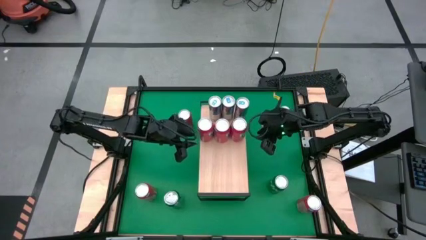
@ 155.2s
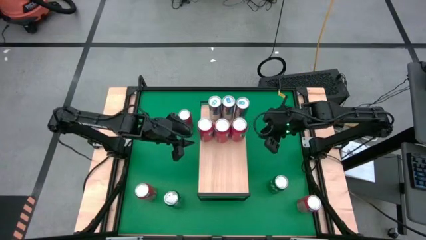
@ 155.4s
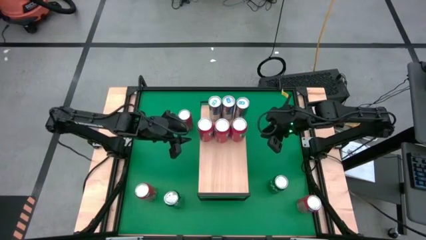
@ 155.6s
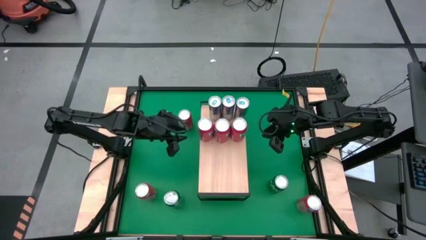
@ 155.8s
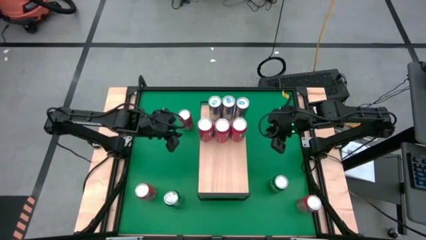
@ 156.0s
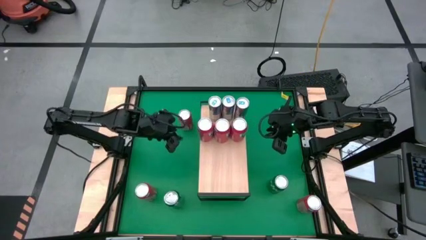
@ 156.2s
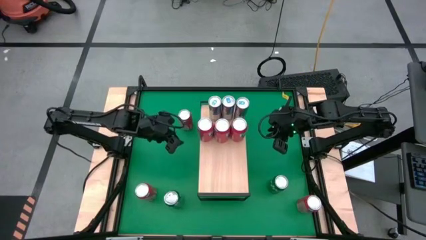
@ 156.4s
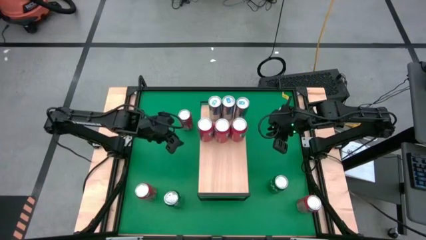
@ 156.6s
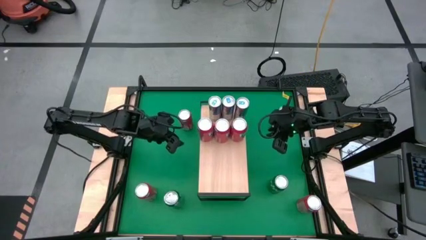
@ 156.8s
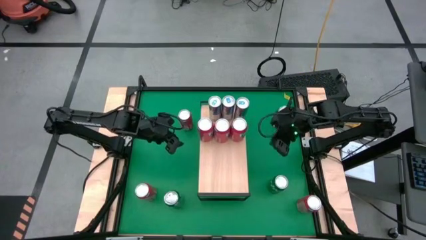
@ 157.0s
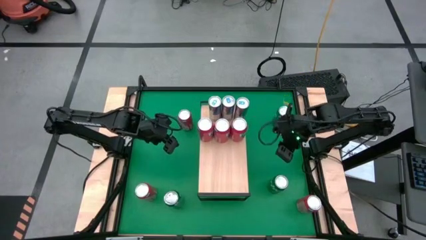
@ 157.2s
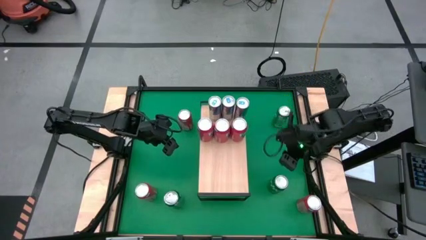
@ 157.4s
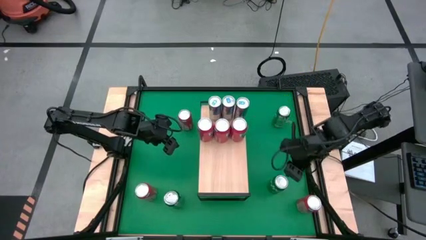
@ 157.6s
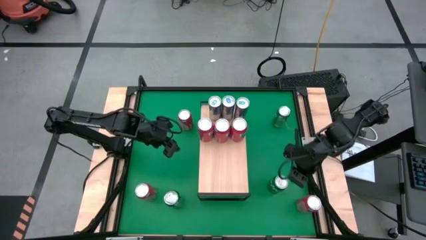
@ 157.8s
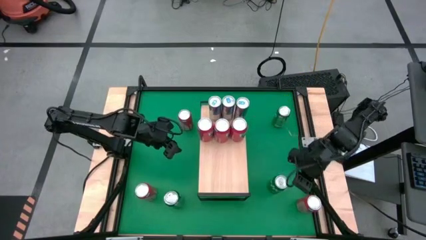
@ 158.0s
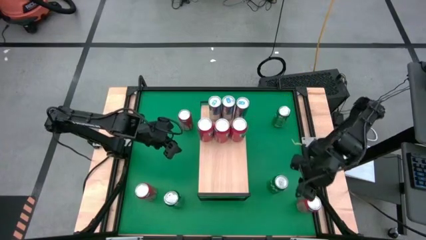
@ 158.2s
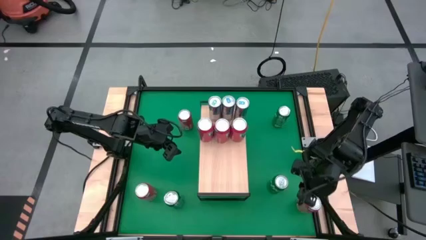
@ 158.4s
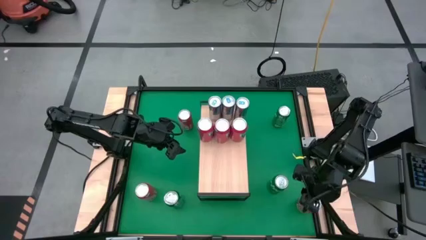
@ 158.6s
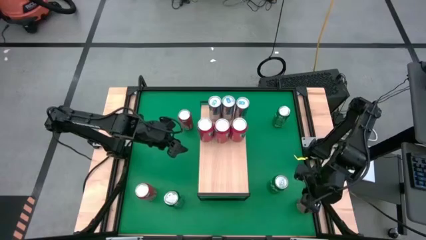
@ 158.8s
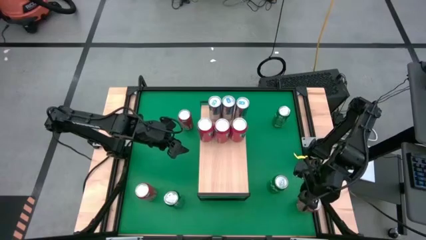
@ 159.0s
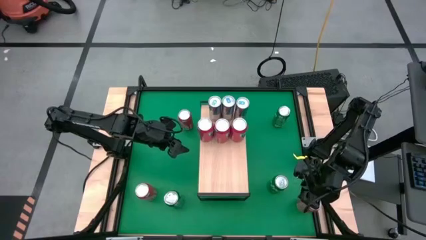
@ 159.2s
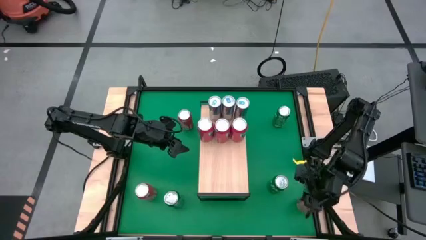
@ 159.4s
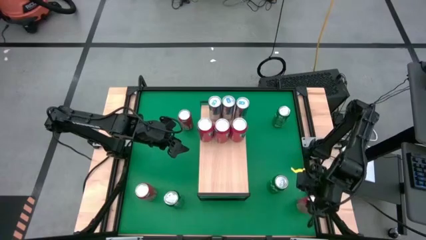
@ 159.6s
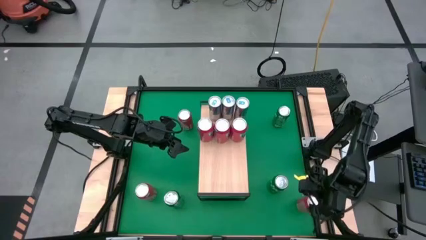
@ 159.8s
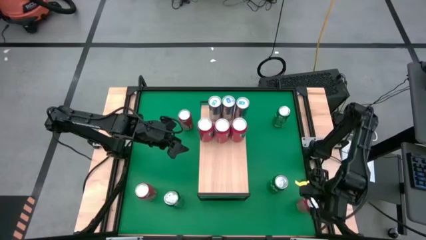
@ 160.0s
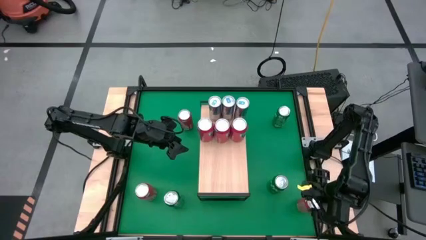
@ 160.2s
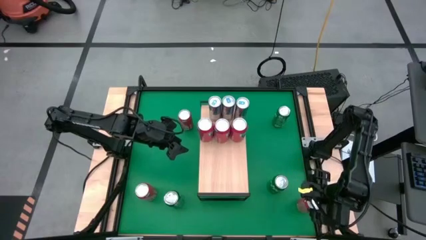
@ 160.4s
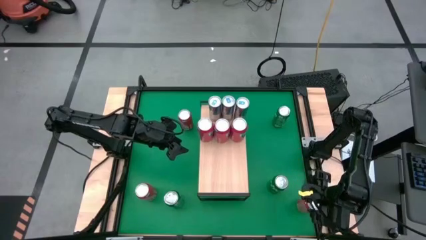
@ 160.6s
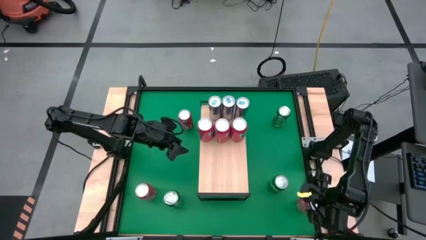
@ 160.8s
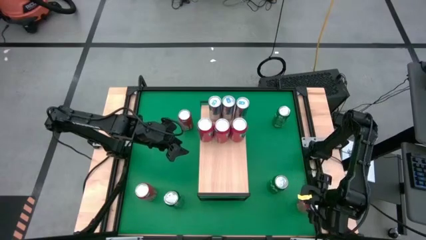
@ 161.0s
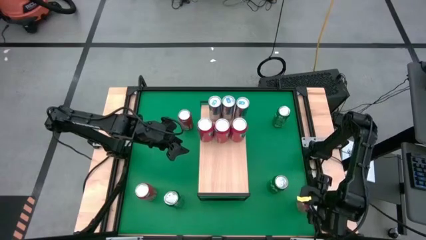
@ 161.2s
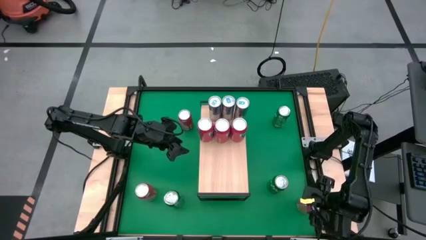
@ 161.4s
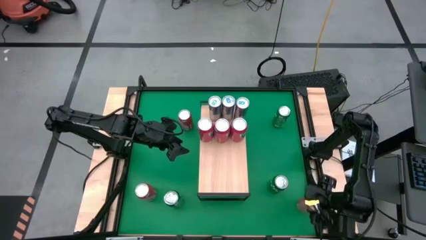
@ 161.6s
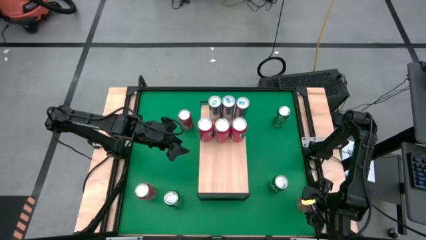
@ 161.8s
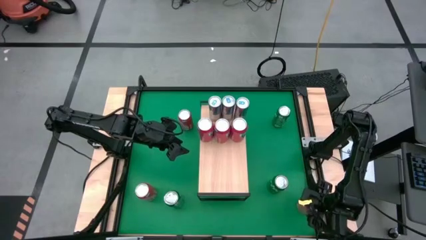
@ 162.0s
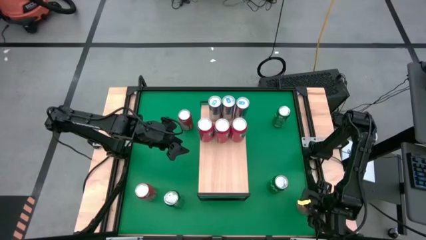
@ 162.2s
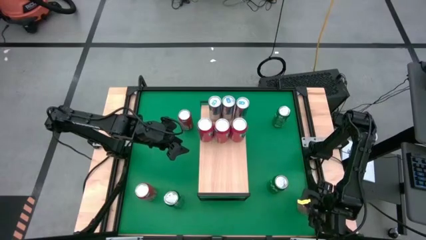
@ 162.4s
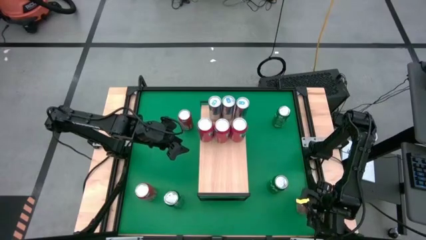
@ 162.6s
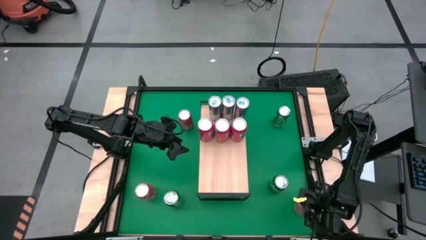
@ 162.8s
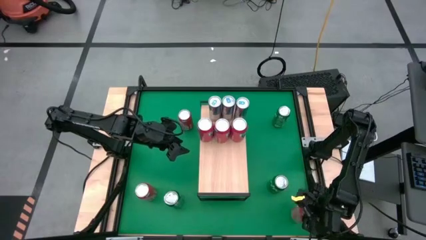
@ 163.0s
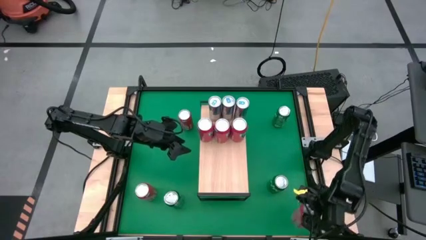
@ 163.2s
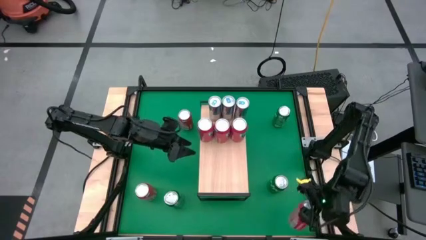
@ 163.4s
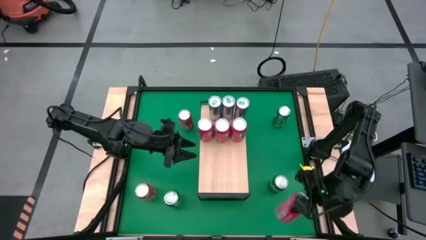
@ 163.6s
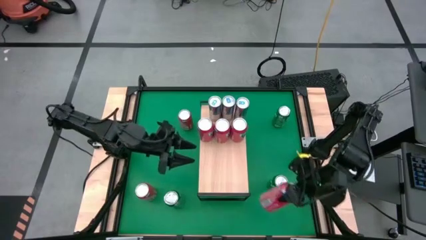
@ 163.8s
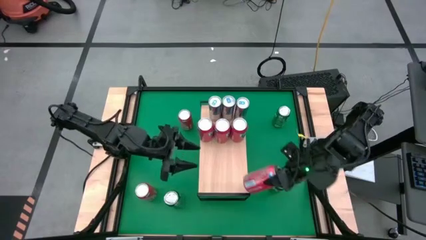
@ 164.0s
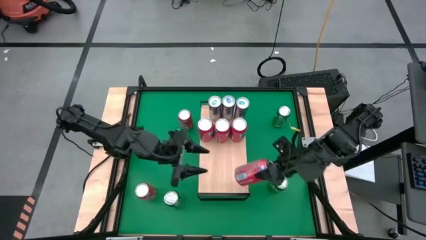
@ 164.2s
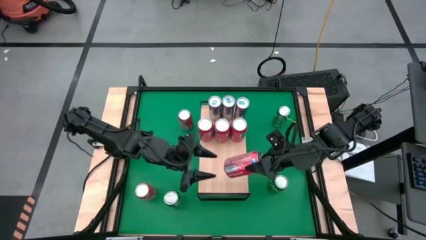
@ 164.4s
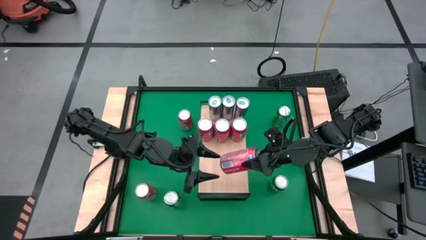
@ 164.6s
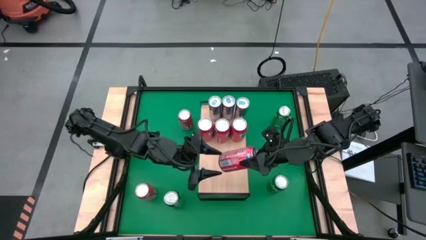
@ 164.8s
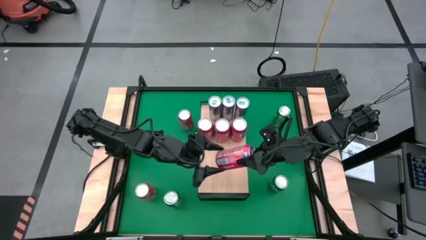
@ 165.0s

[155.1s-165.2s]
Task: Place canned beverage on shelf
Put the orange soda can on the shelf

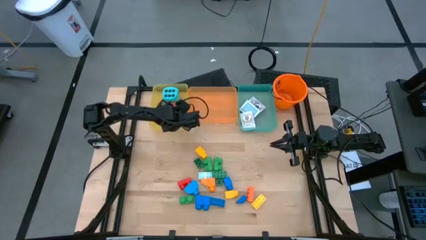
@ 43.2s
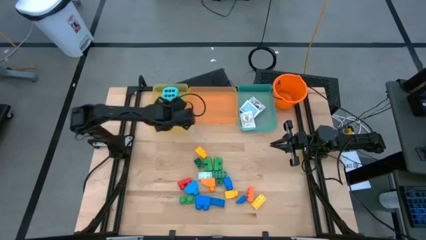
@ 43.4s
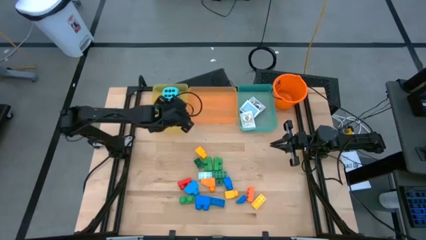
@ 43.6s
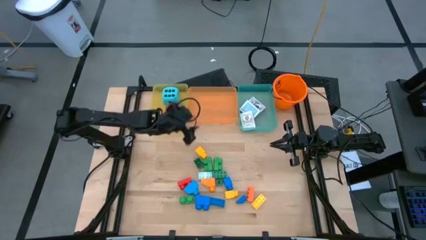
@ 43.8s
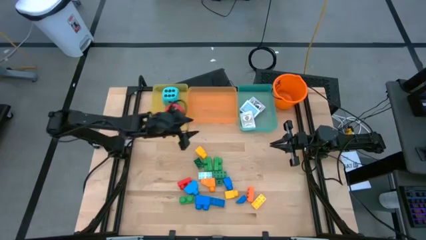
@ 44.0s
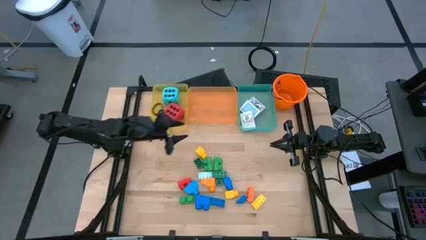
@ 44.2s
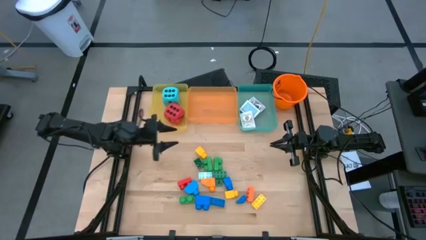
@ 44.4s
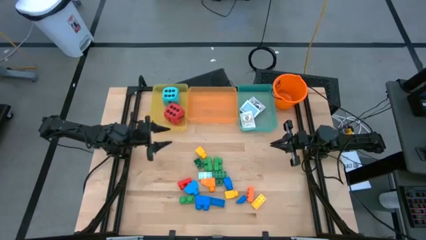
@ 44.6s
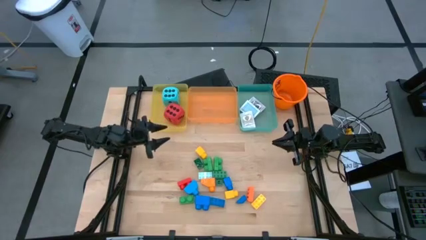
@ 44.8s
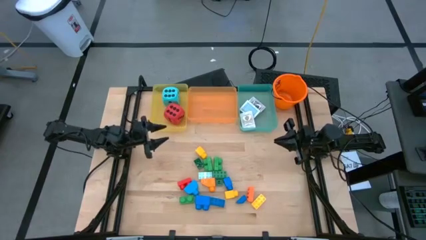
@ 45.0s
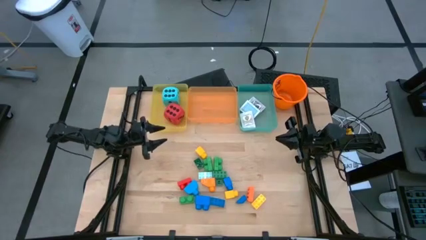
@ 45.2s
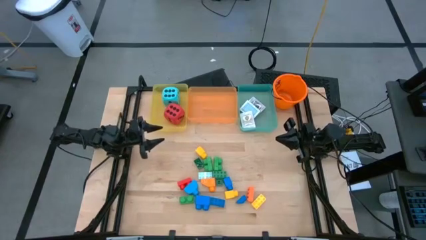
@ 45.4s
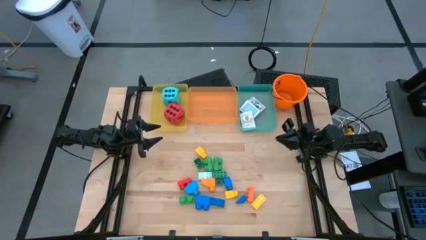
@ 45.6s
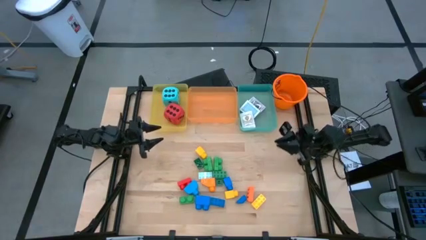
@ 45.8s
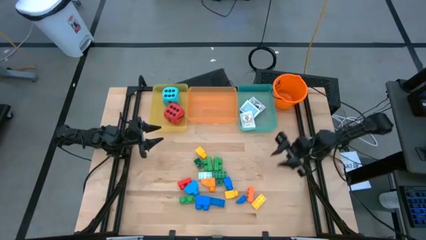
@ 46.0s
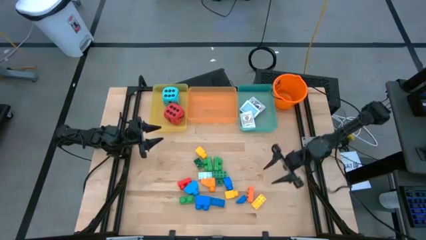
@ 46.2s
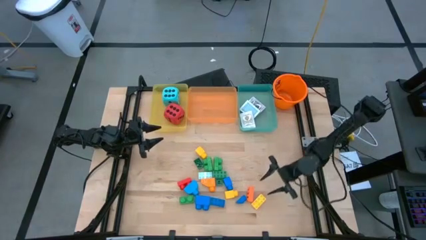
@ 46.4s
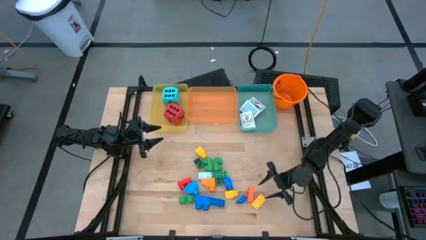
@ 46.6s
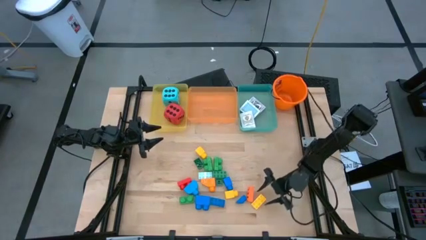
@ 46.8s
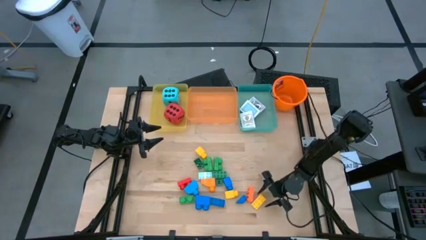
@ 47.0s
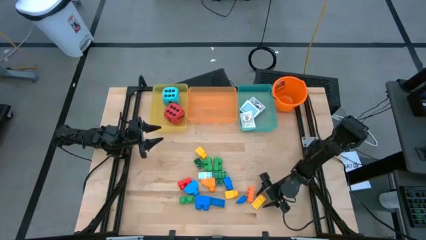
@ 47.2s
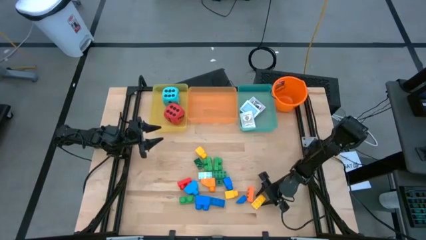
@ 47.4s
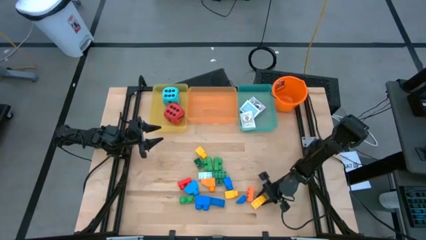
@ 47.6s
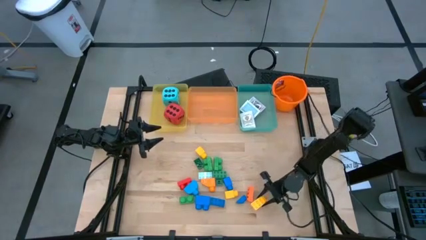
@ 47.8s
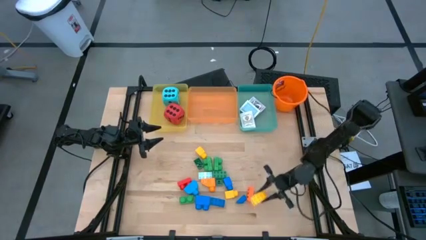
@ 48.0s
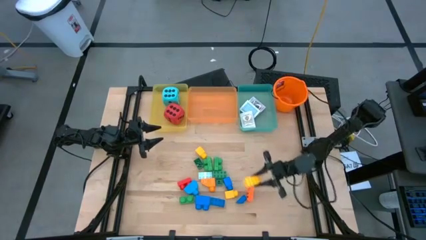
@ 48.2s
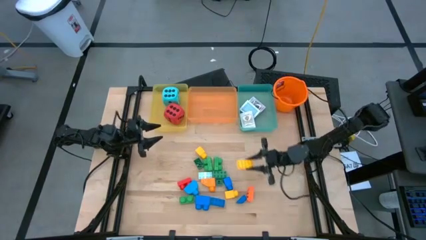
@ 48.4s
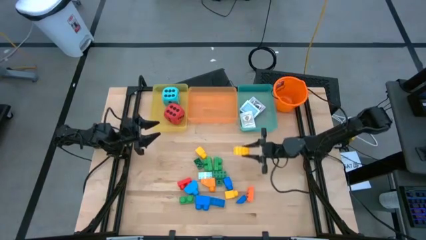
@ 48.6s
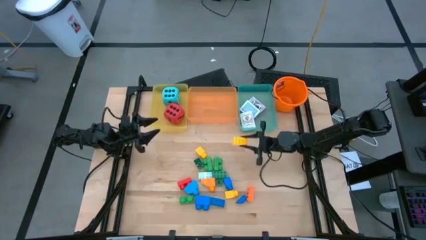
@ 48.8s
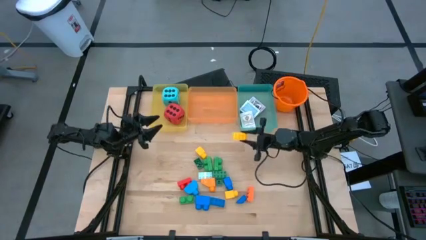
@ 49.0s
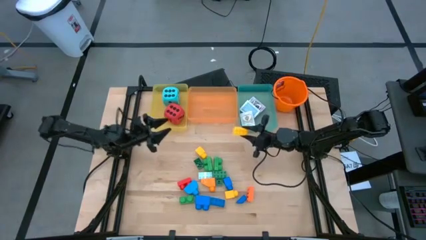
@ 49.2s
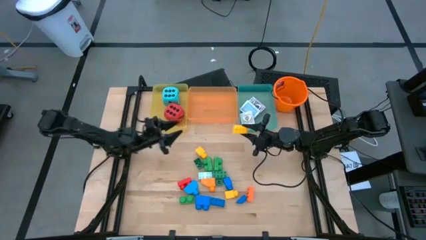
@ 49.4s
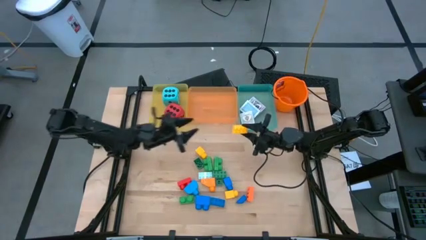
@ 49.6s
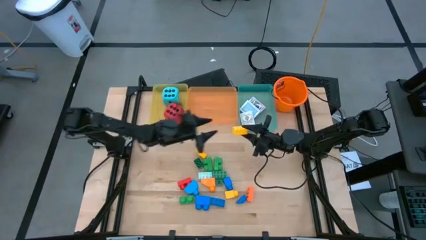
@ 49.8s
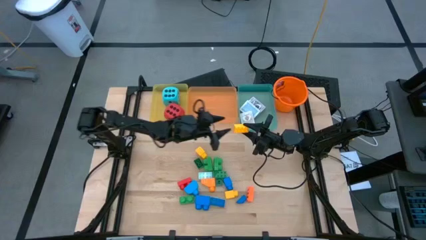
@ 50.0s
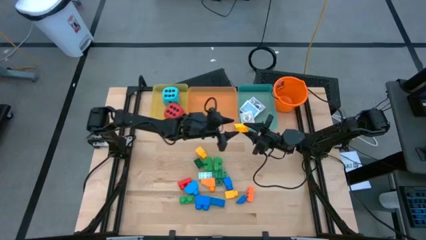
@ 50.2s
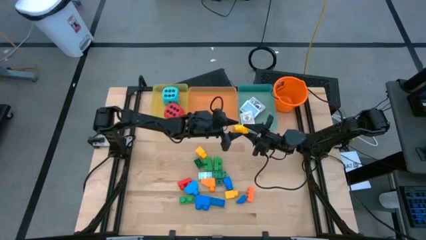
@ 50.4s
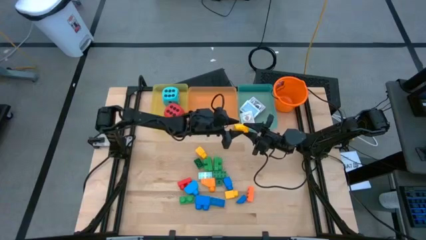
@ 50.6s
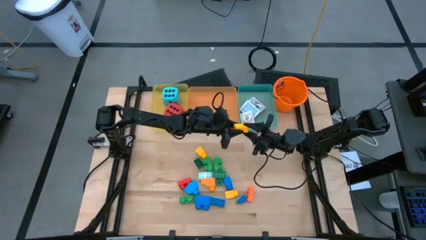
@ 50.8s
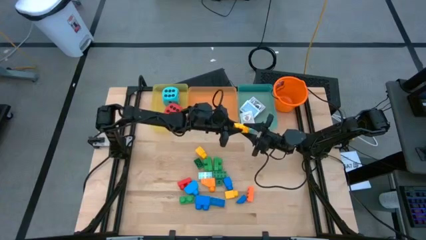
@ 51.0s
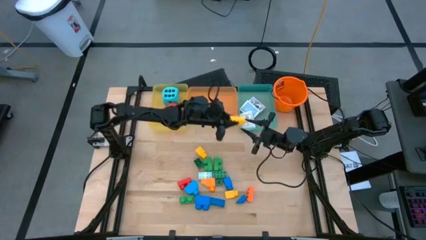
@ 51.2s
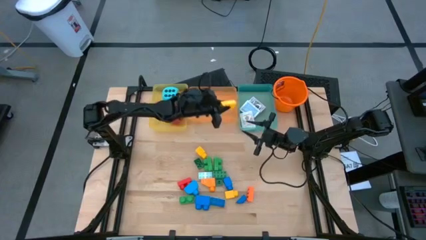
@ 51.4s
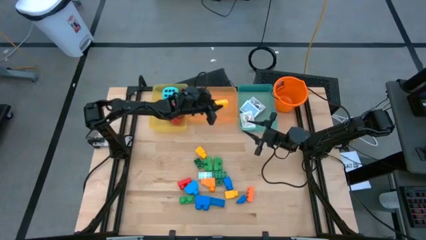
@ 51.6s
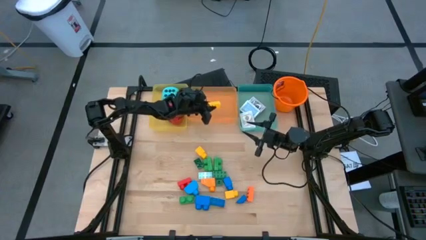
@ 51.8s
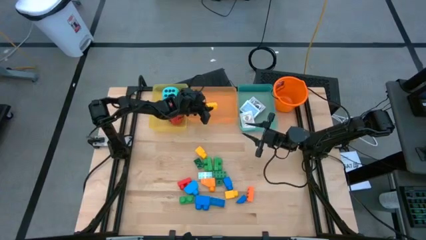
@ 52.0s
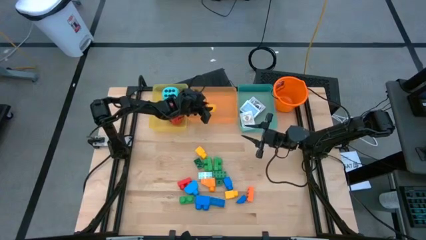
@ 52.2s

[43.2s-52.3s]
Task: Pick & Place Toys
Put the yellow game piece into the orange bin
